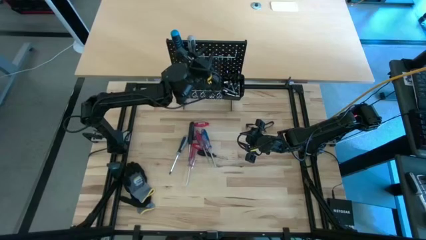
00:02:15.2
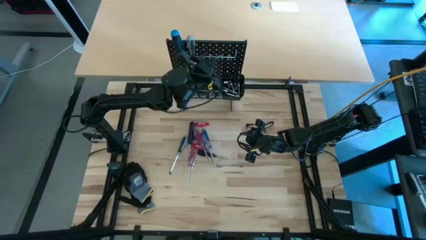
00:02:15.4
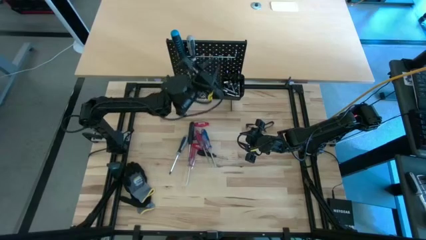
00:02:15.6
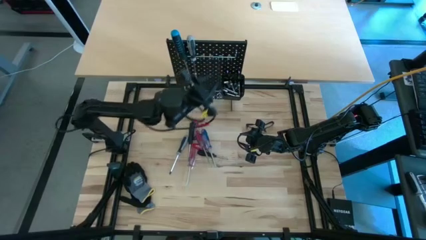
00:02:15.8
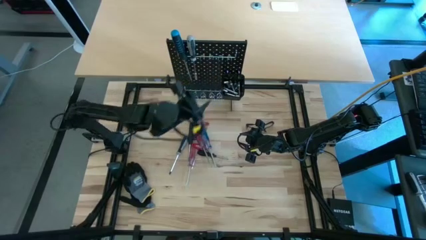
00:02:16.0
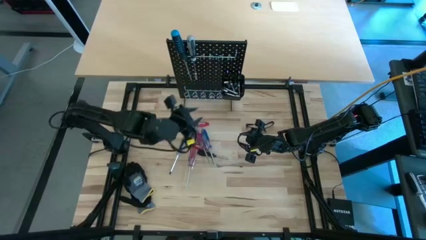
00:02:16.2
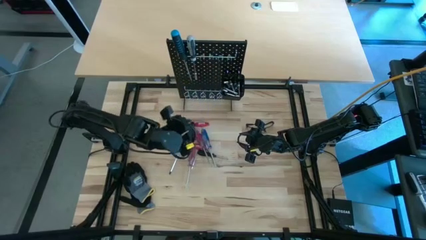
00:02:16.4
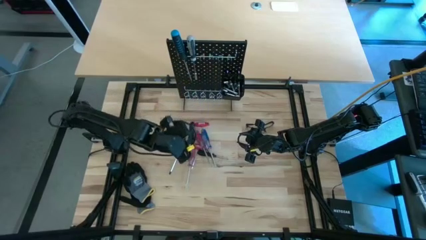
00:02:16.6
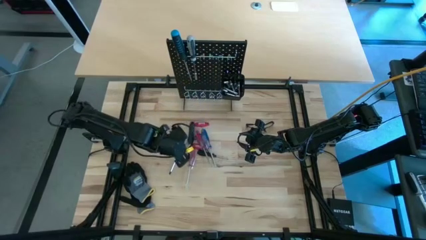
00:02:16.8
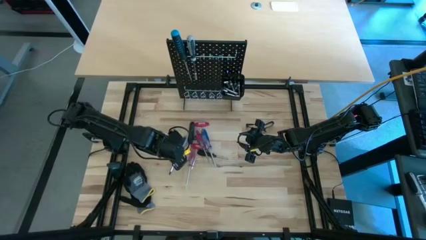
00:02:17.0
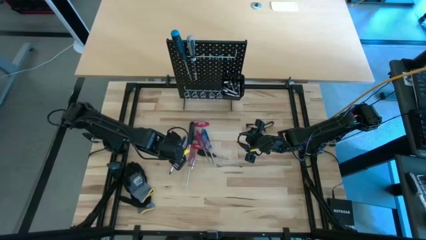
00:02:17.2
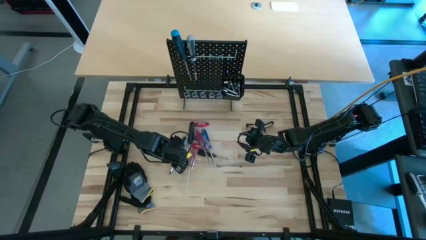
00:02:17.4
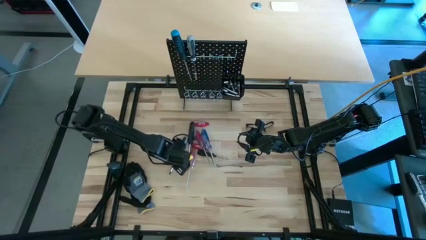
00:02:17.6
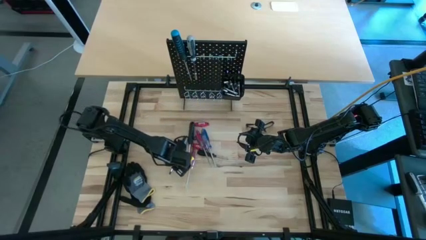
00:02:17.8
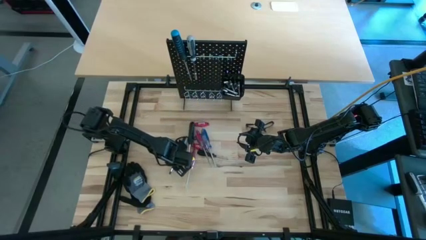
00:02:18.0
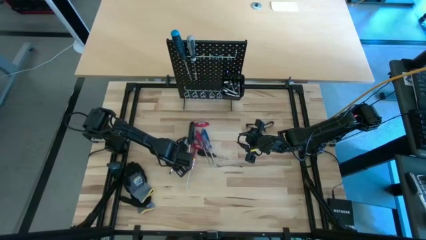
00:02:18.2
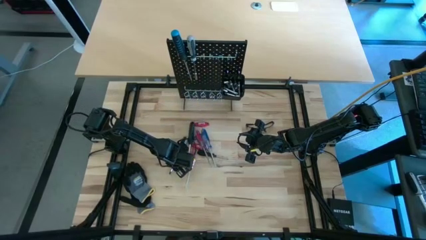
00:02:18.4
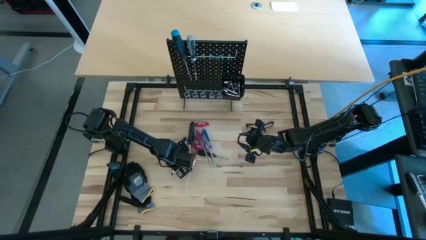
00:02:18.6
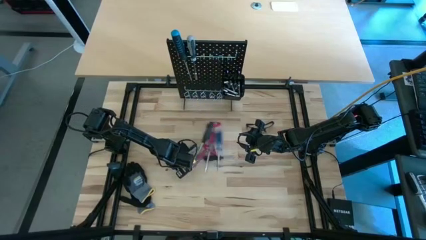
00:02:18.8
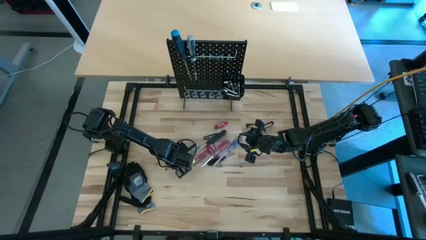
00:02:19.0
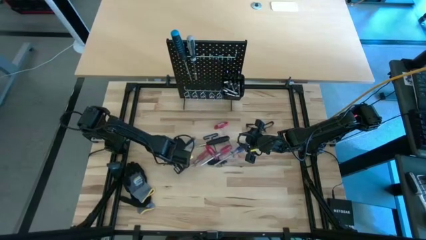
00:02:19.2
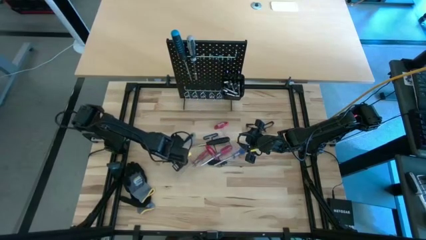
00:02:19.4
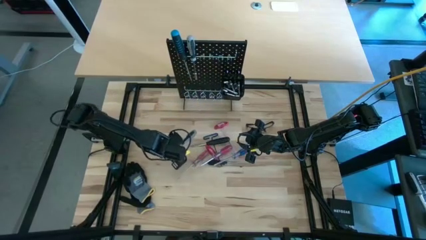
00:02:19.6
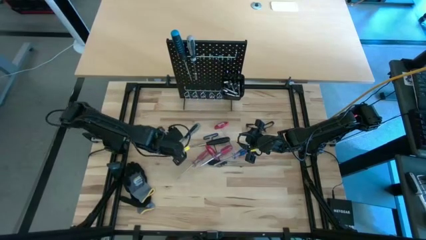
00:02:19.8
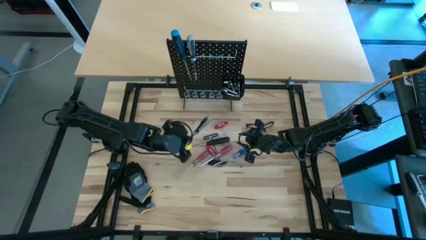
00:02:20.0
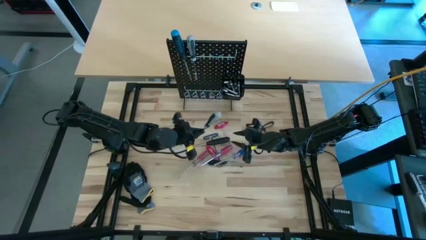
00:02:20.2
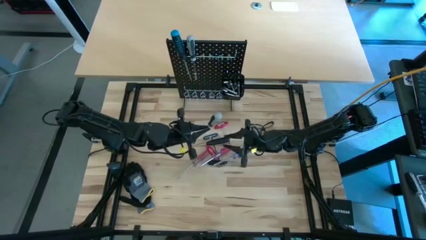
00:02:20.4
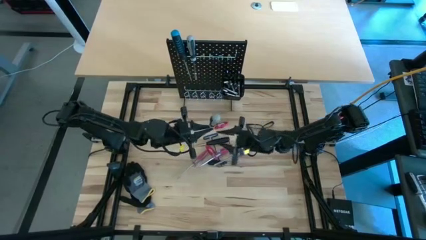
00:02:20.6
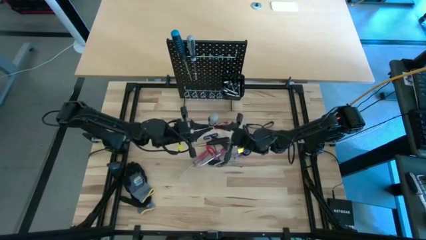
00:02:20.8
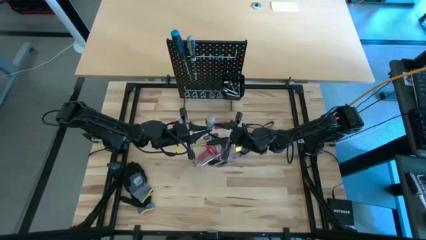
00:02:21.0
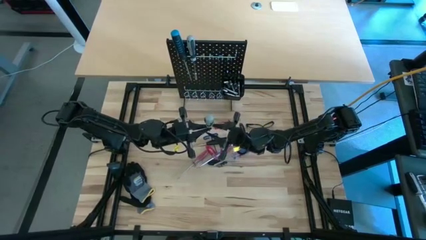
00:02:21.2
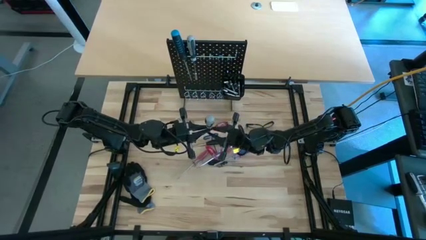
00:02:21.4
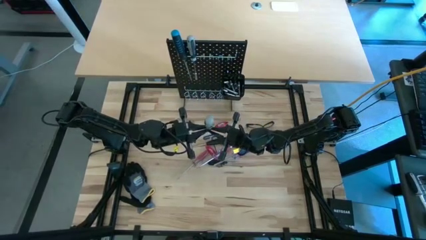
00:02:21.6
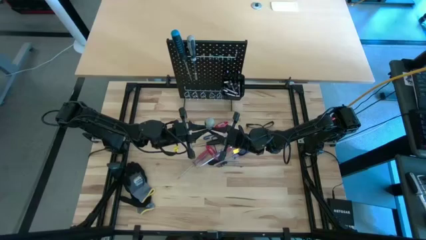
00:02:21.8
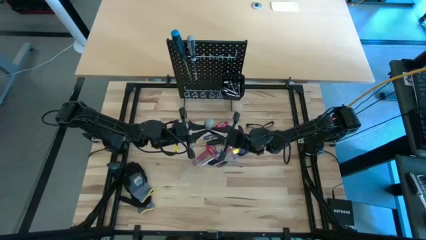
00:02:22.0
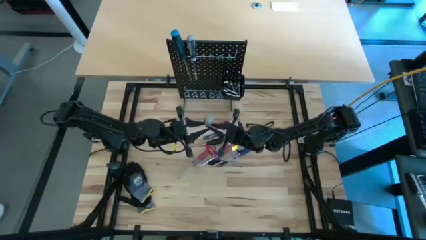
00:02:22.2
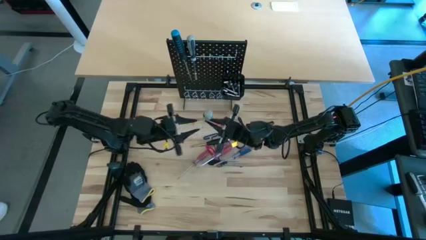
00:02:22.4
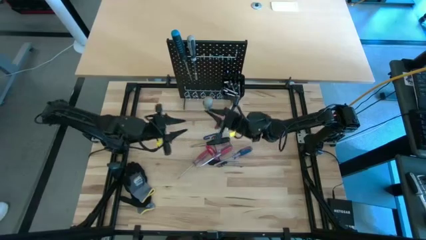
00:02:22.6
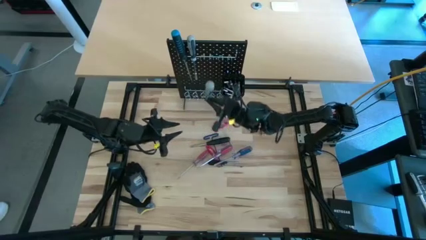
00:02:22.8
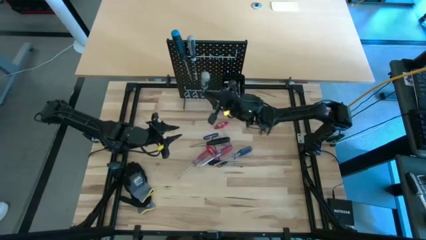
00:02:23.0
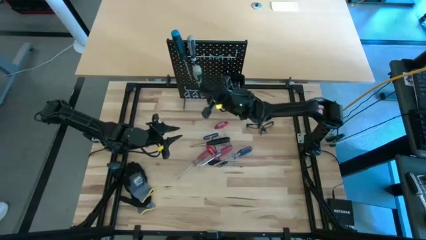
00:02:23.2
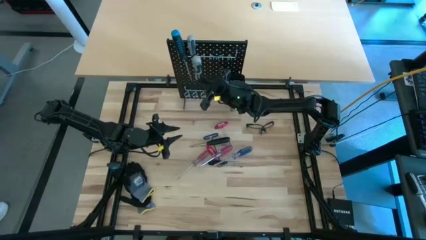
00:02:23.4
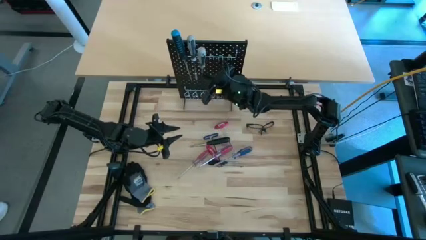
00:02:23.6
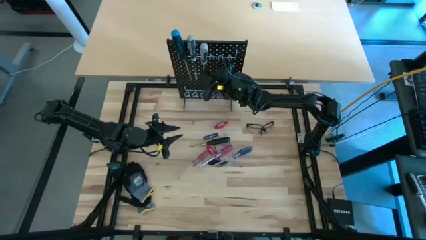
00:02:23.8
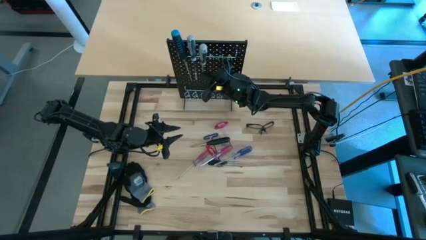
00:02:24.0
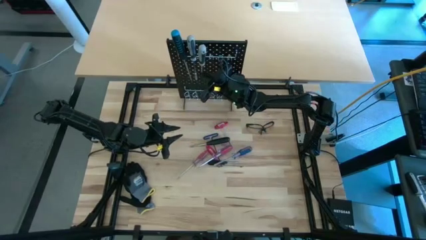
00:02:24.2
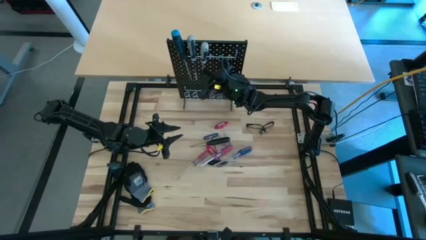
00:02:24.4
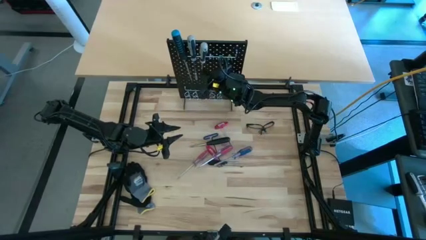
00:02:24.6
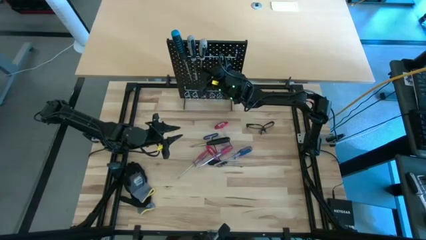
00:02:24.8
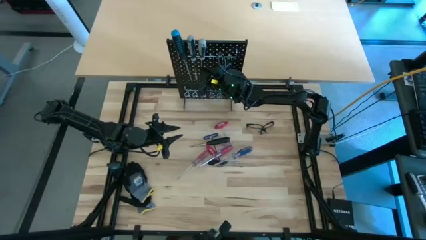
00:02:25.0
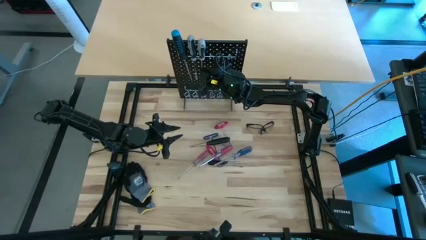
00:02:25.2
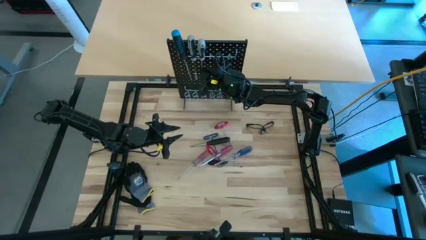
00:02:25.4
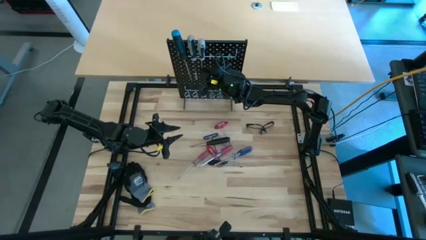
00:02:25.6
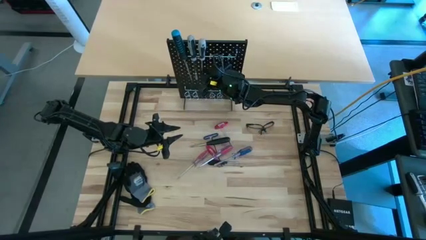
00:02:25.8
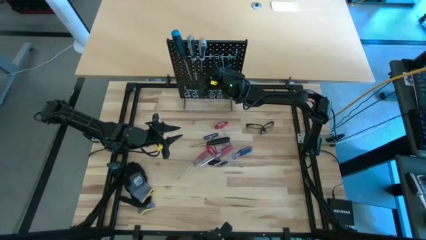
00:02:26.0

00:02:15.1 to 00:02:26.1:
Task: Hang tools onto peg board
Hang the gray screwdriver on the peg board
